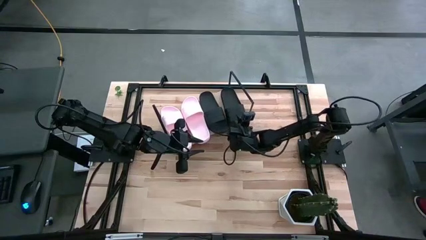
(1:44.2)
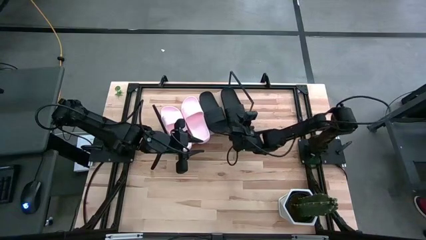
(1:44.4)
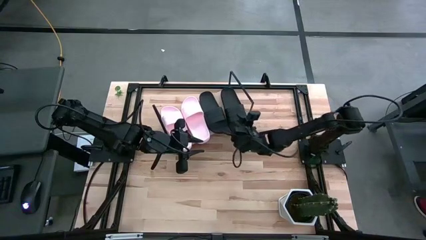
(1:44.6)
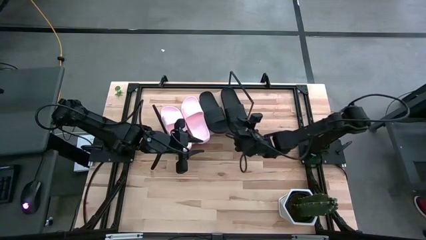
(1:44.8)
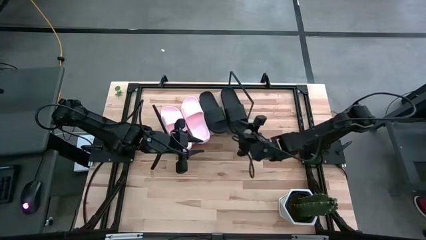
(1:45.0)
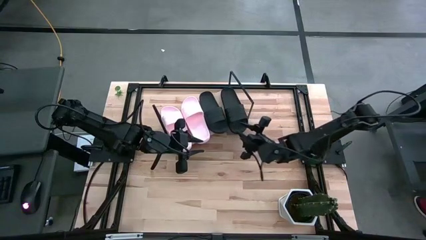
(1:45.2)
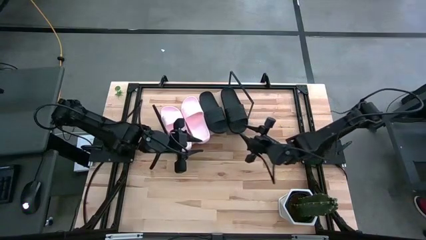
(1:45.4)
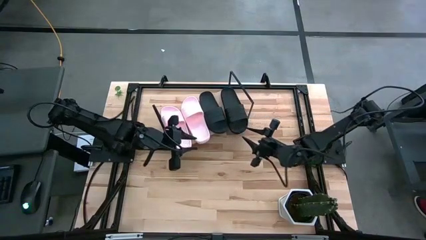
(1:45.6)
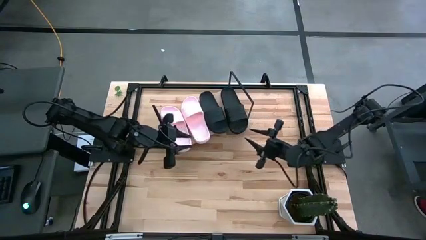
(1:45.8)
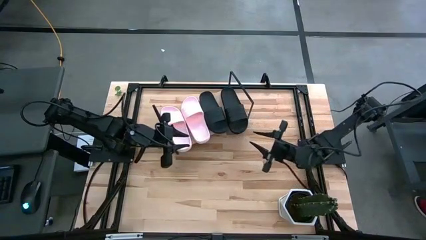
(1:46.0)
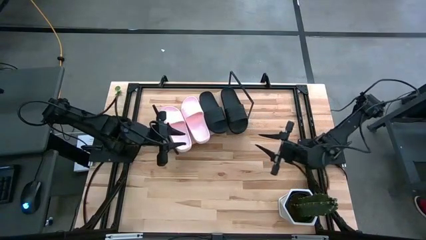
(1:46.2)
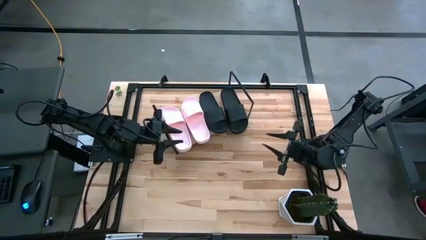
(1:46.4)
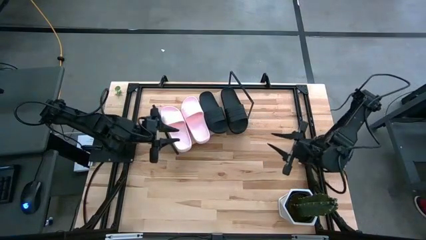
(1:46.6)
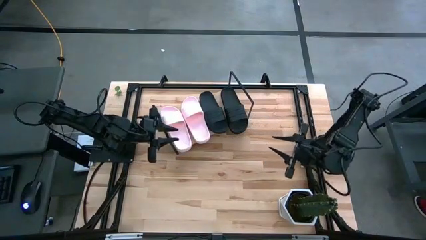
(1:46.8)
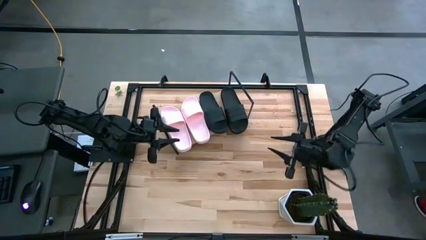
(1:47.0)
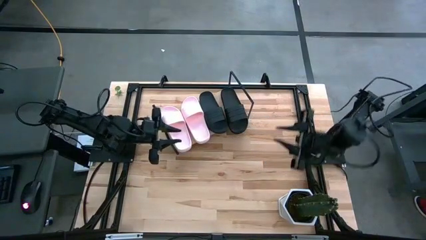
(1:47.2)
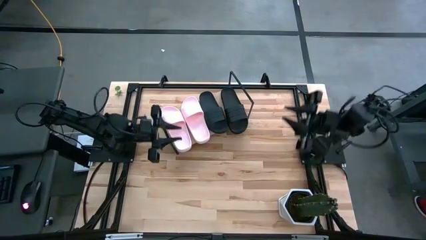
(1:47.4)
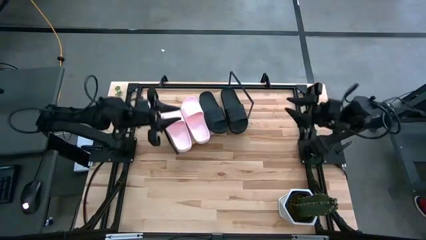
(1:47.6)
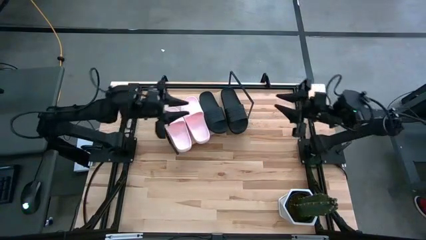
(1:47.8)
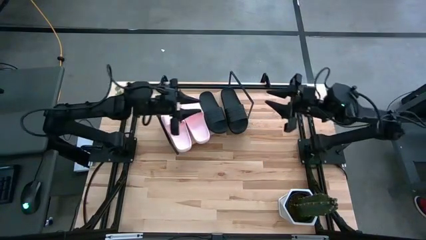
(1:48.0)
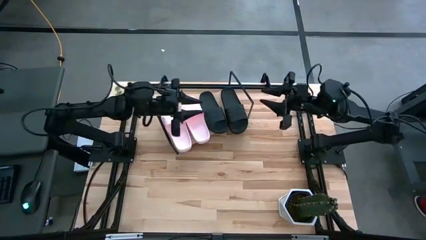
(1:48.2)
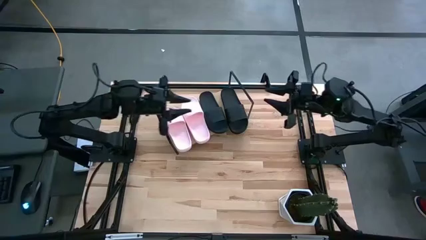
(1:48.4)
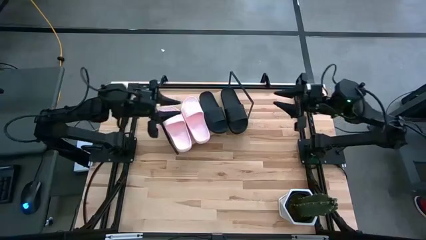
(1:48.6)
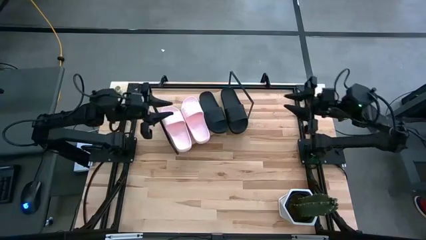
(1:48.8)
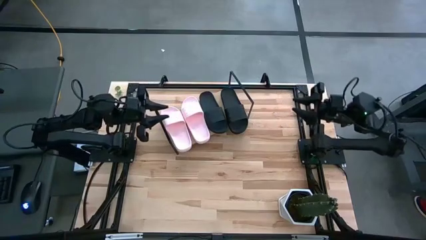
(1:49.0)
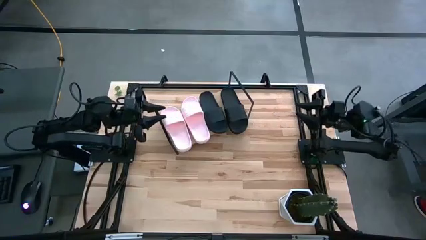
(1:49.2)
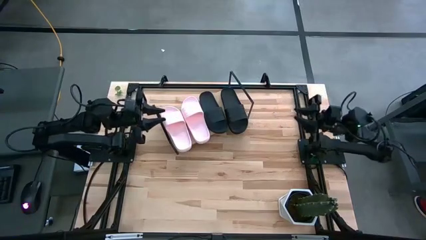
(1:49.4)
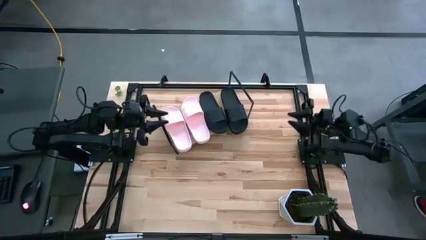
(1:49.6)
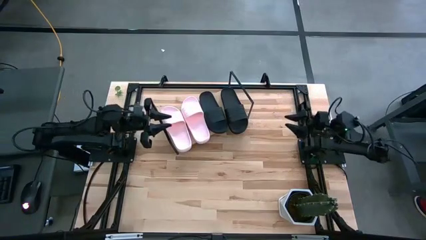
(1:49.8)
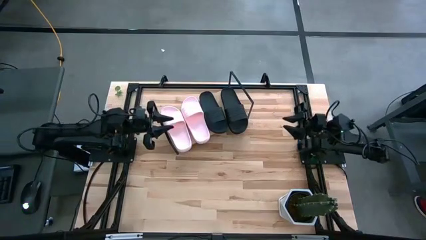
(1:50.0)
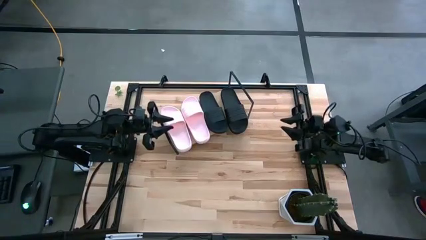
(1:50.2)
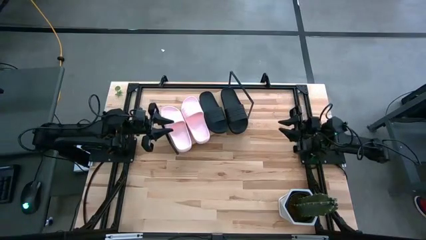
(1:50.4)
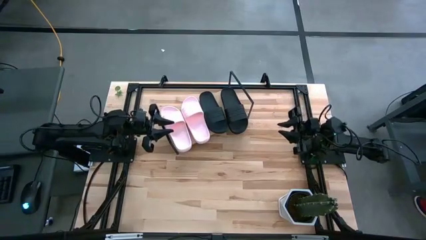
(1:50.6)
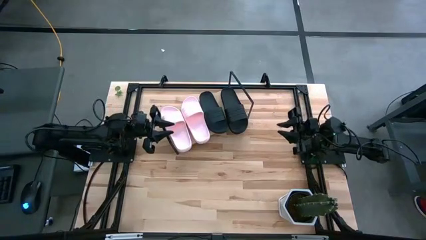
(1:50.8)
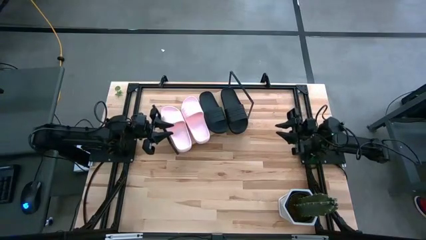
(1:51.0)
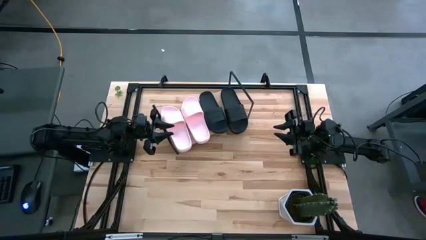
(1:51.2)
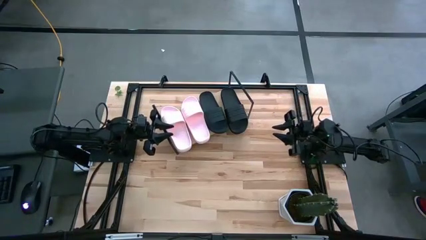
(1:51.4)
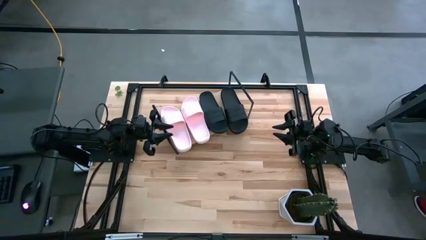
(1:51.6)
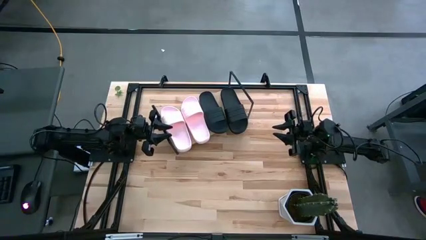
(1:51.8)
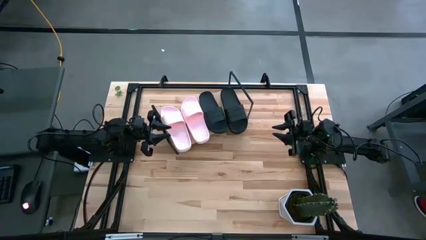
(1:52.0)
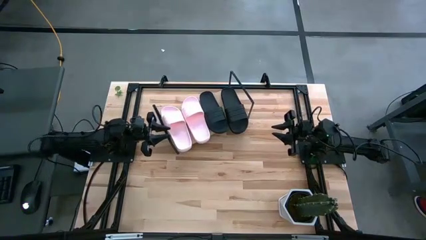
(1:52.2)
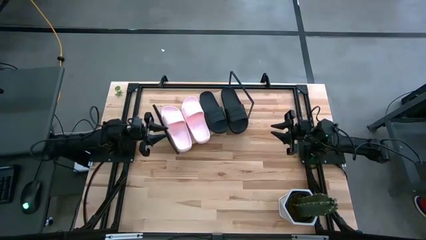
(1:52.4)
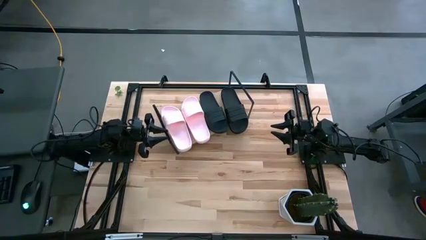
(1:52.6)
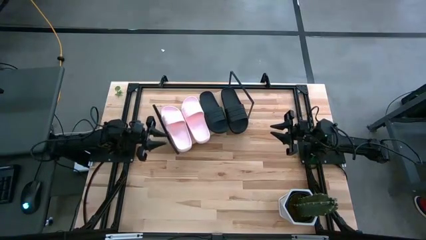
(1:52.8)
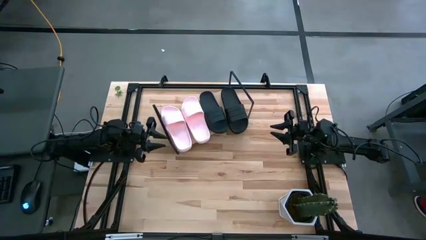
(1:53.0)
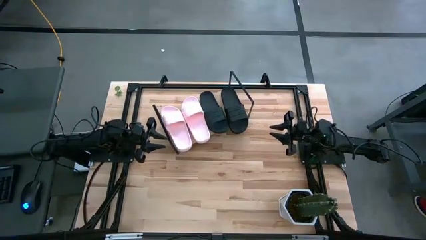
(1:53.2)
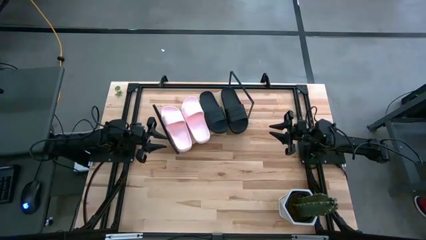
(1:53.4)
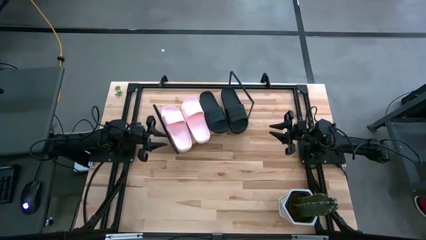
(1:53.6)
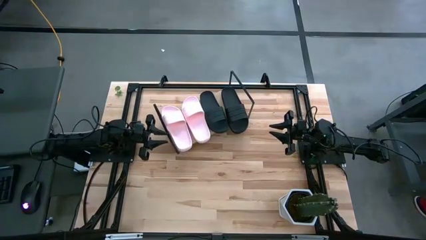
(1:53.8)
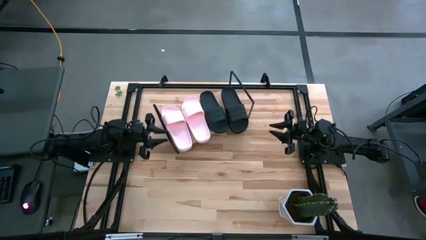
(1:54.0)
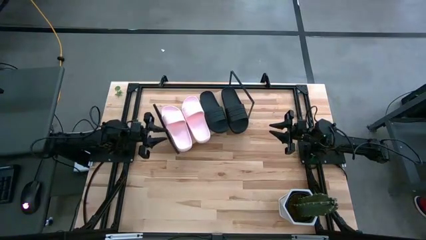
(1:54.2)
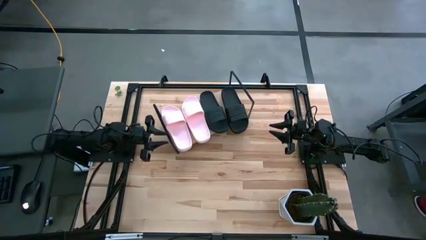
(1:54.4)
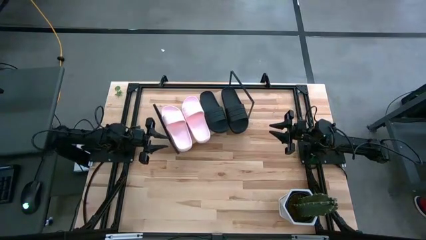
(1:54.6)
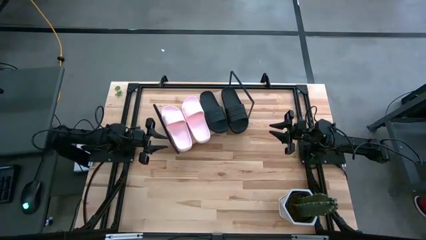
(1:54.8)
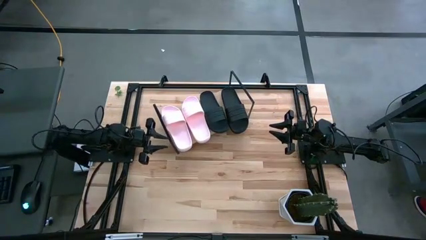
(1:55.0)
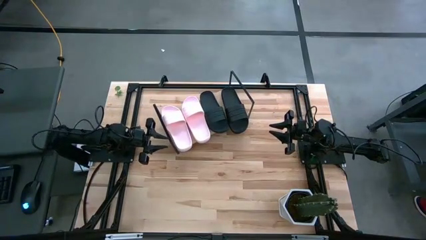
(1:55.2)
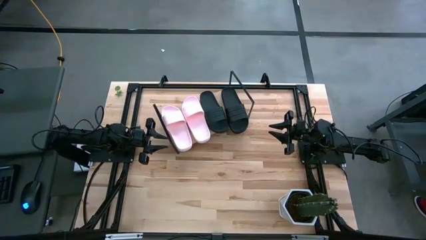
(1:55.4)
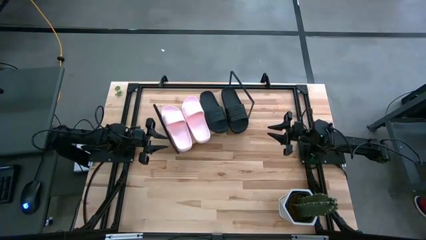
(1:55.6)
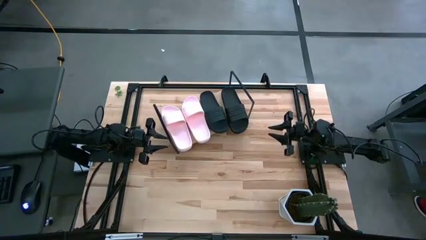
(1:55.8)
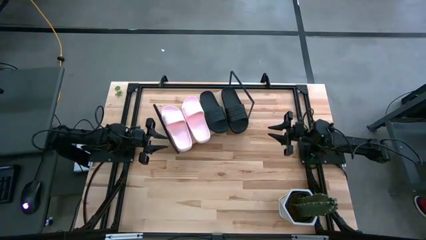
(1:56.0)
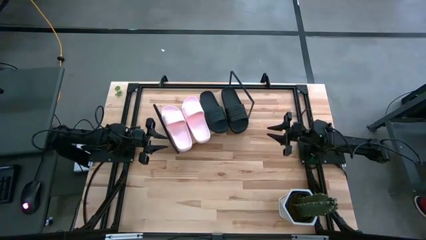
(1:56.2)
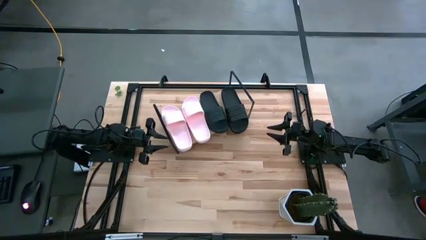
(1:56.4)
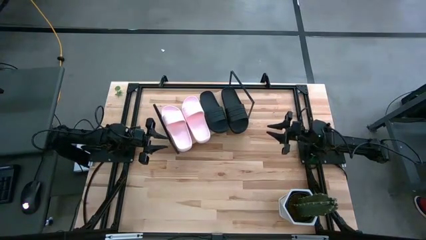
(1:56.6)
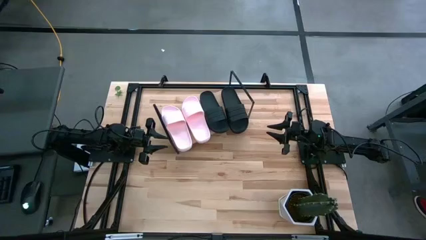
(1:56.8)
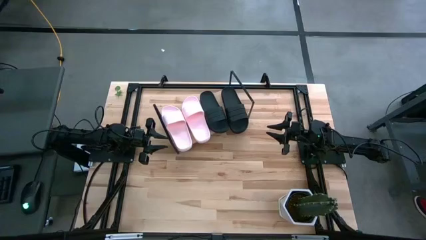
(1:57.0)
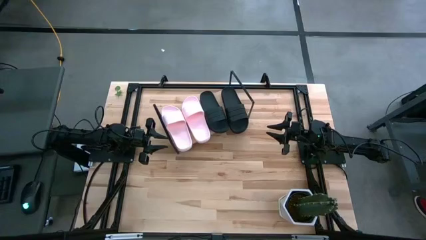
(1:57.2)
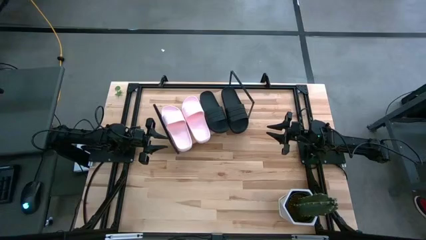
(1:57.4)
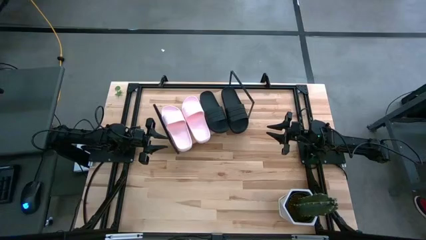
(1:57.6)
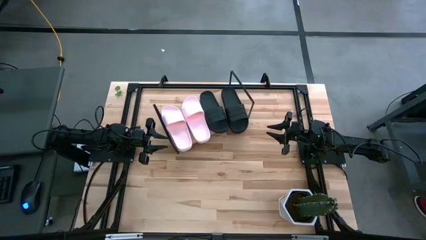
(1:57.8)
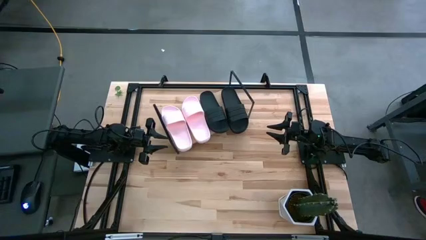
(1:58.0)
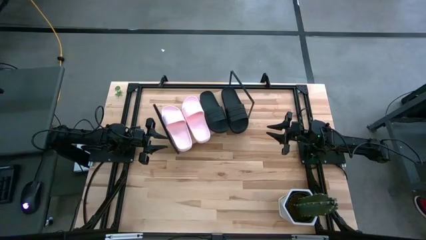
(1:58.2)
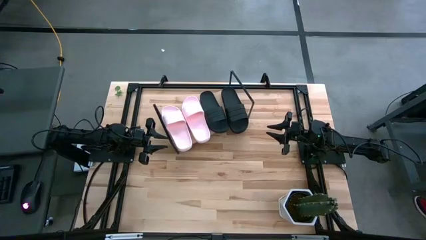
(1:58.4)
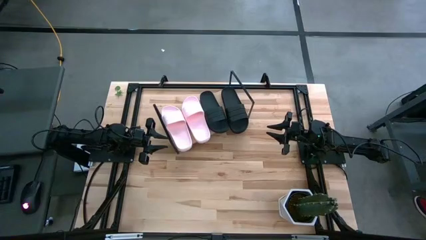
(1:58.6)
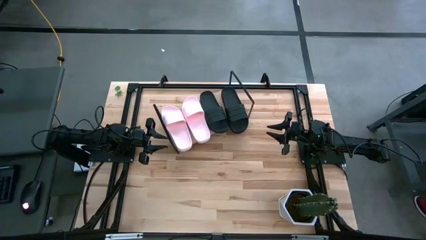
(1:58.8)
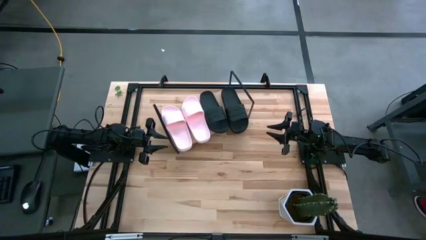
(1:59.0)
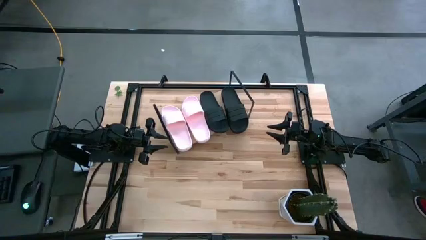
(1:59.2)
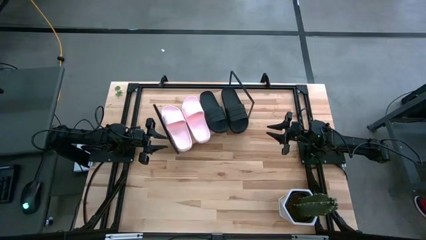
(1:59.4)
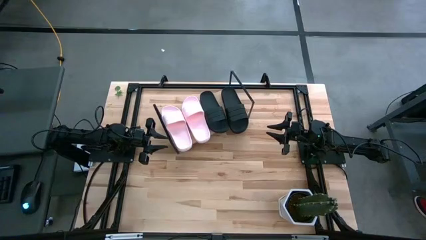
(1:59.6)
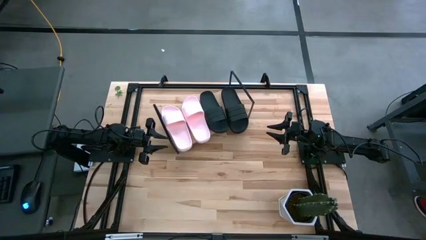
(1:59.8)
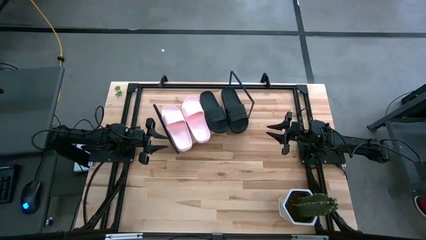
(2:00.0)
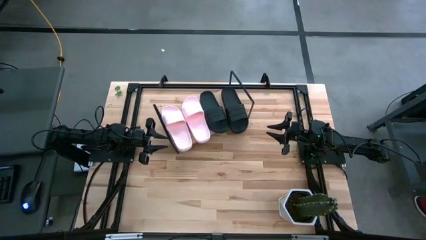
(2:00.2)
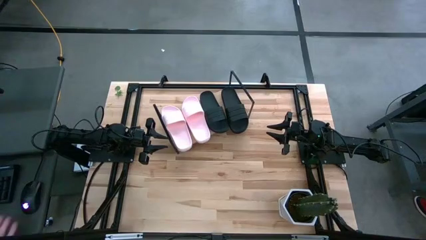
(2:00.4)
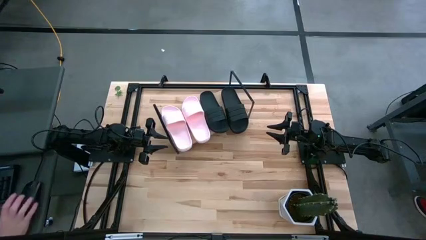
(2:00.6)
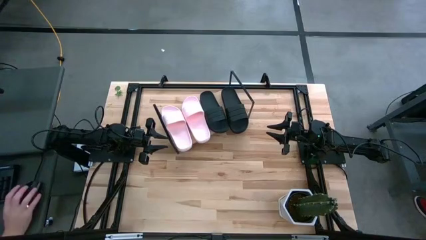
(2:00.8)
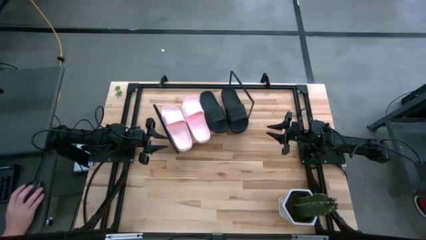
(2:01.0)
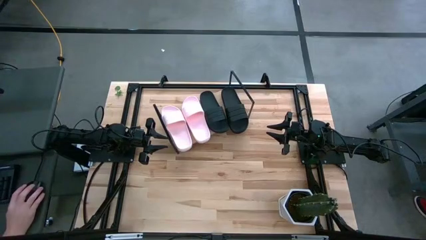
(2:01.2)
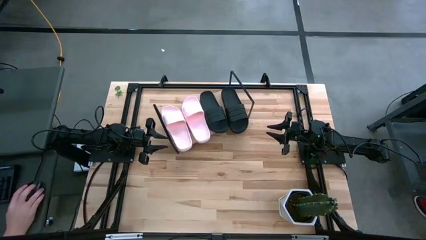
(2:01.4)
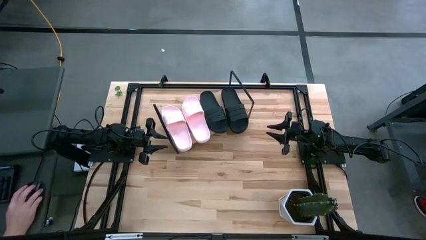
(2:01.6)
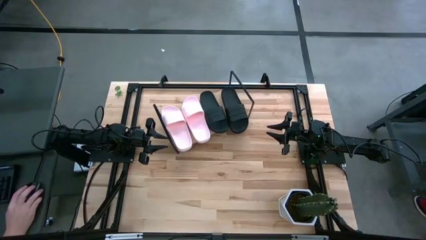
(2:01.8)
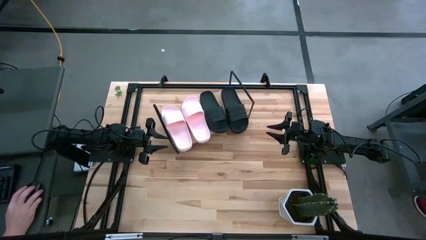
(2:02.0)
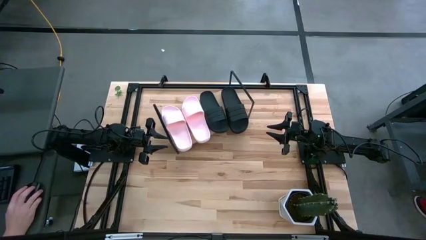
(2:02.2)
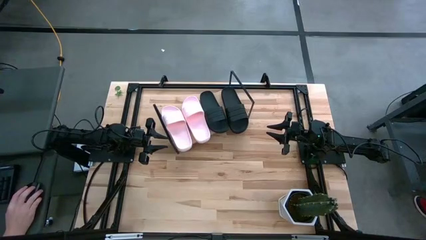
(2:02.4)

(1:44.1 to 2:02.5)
Task: Pick and place slides into the shelf
Return to Home Position
